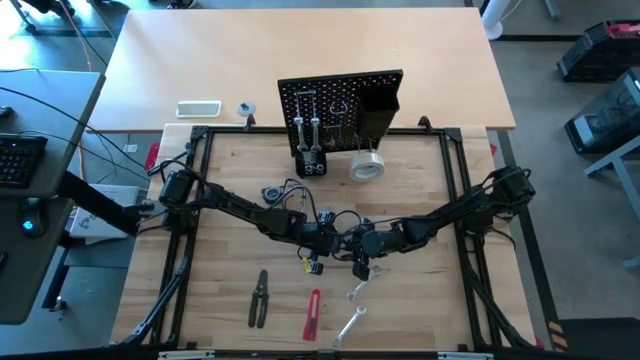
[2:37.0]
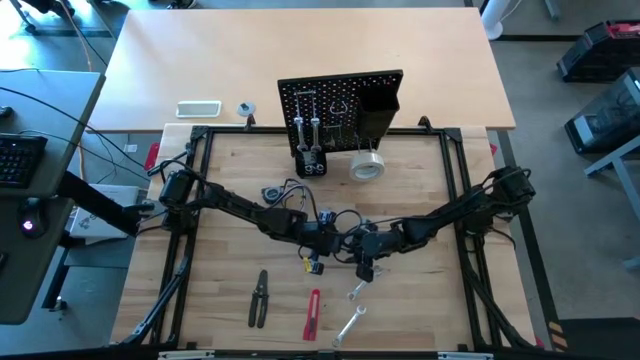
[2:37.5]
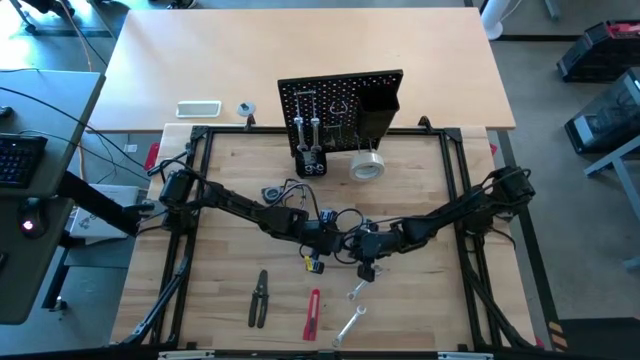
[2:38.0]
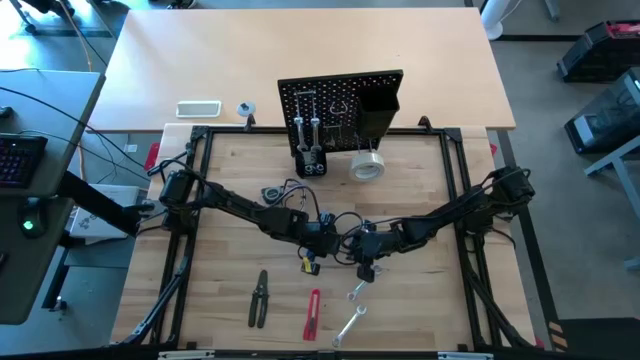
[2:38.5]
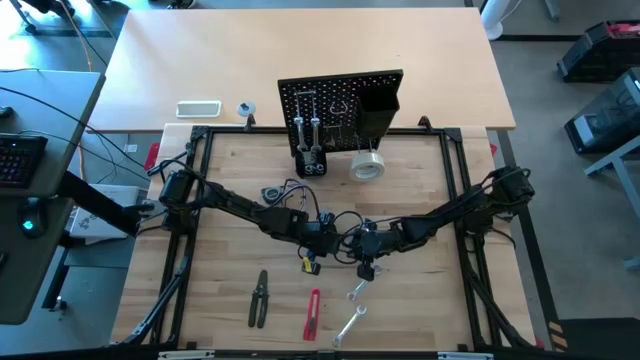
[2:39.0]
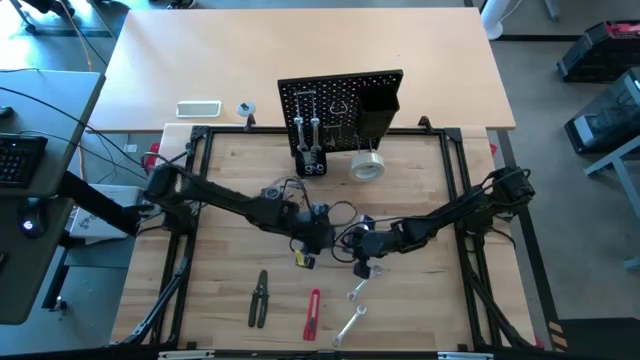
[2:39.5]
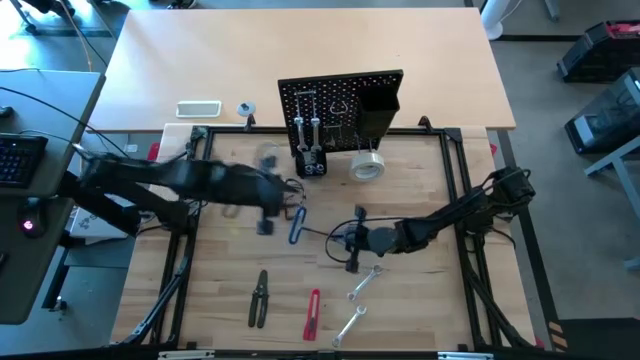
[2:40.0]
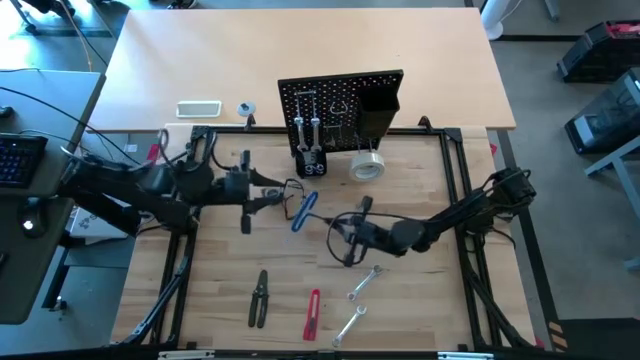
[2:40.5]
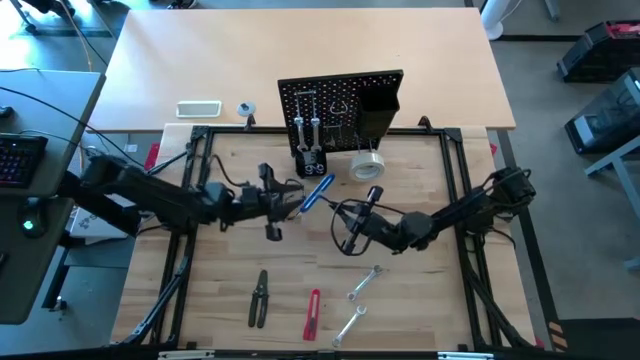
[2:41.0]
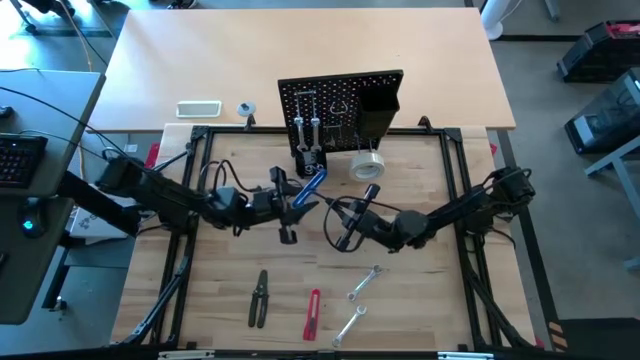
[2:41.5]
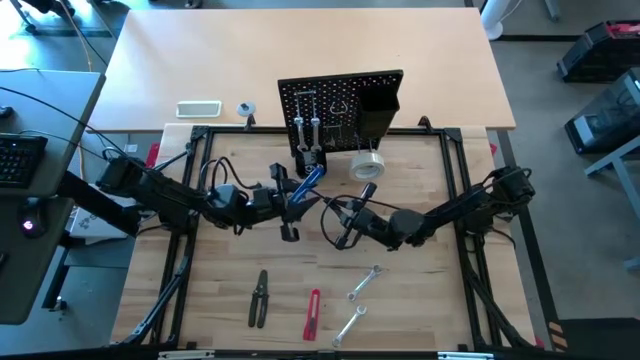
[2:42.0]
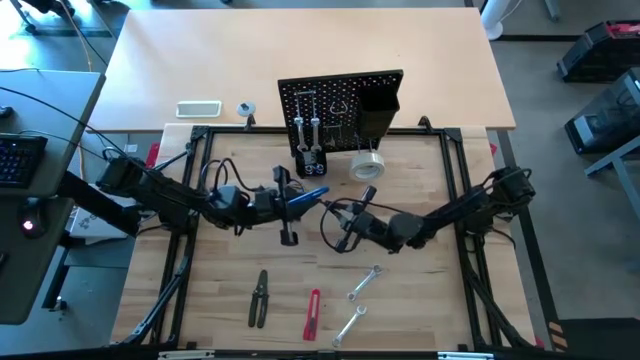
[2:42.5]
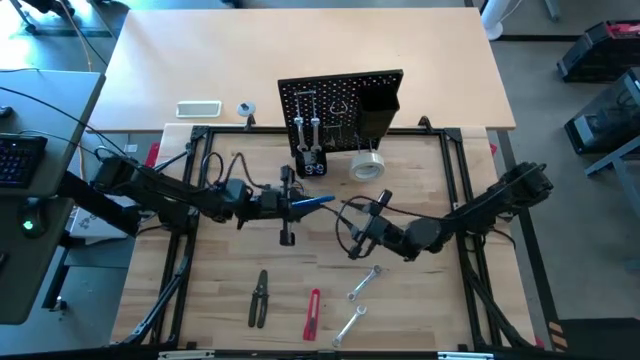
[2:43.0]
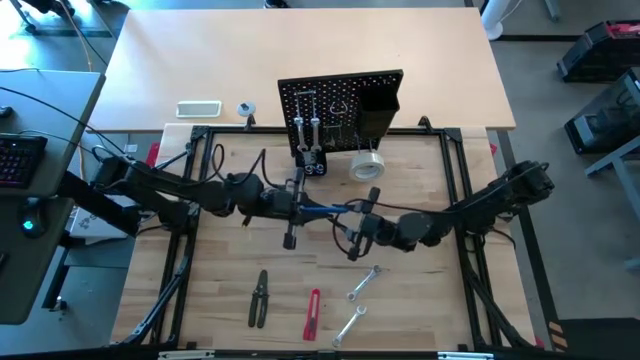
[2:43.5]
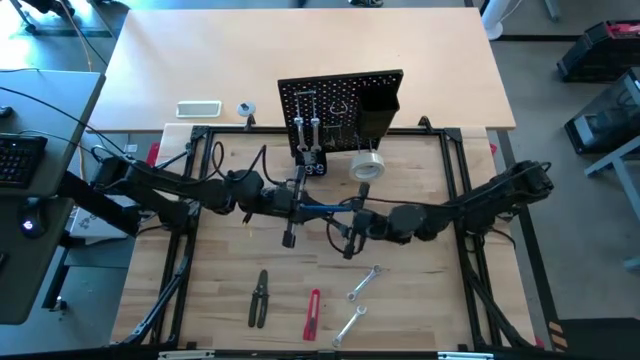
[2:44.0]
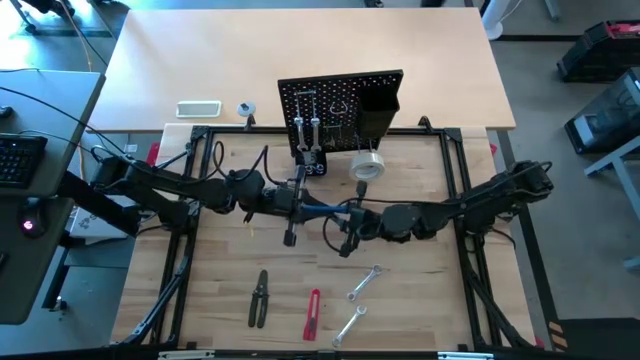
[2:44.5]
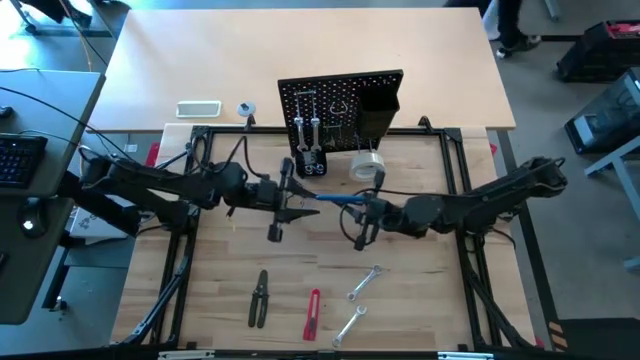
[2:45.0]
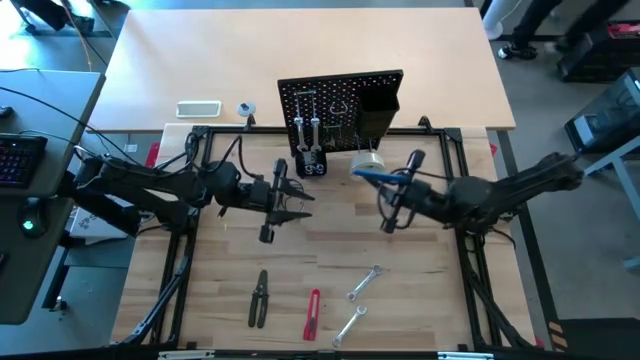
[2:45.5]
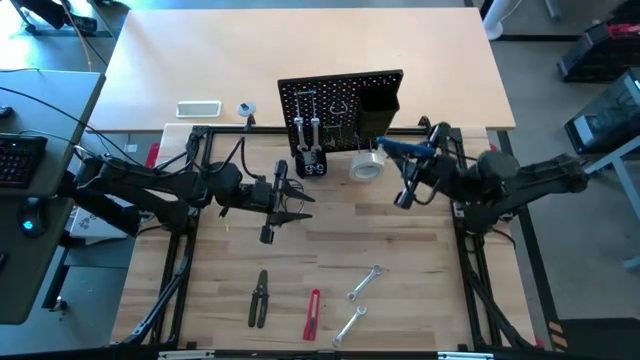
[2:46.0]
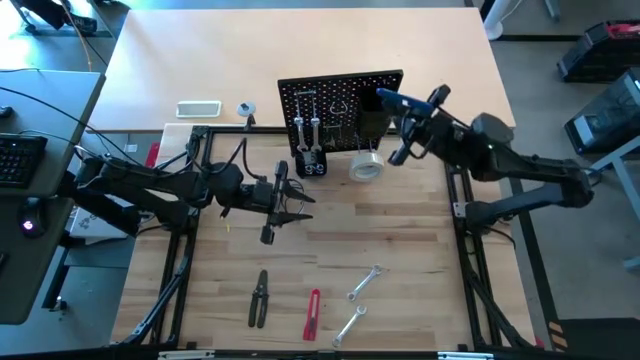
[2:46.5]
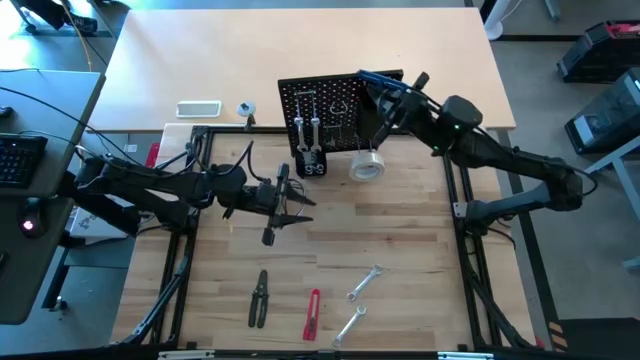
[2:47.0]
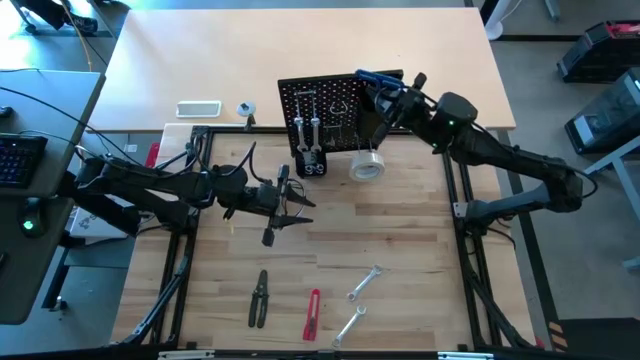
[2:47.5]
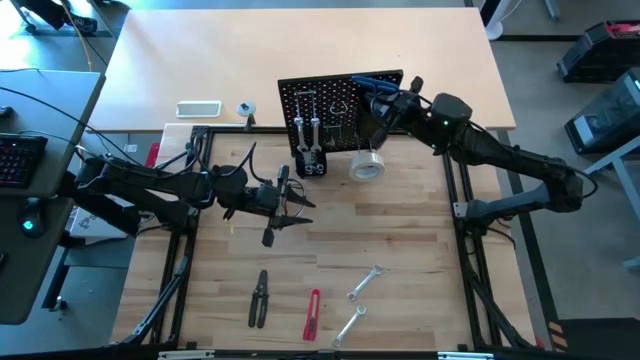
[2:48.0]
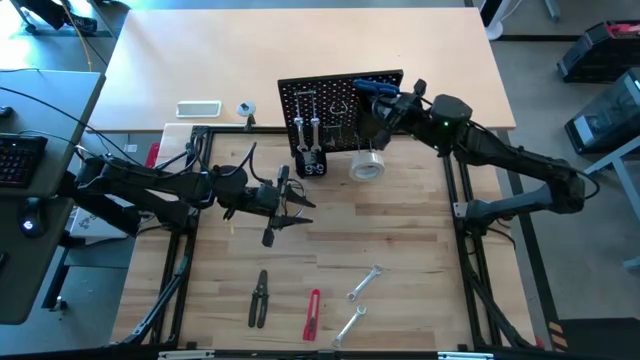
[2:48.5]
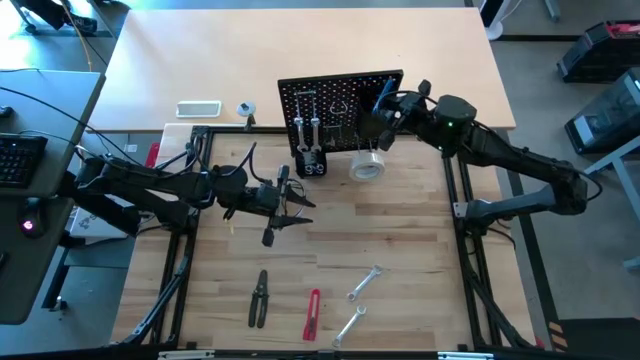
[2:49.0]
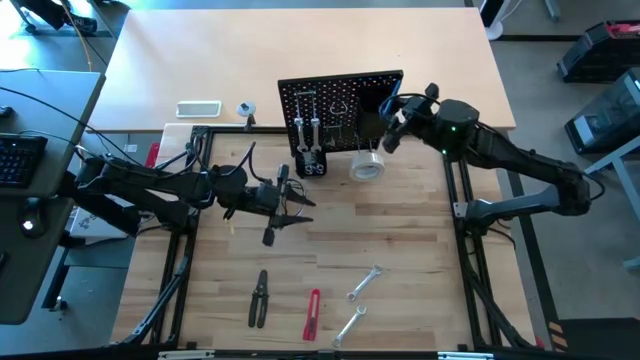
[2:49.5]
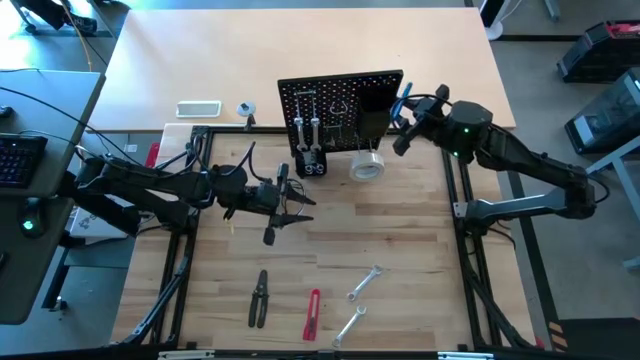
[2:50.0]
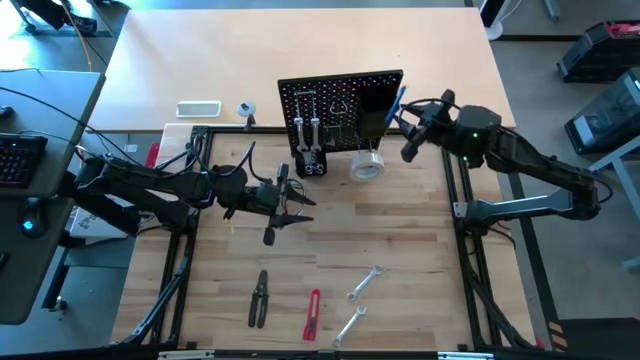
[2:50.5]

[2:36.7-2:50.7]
Task: Hang tools onto peg board
Put the blue pick tool into the top black bin on the peg board

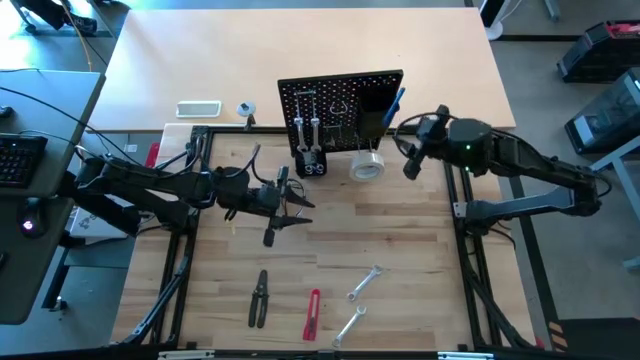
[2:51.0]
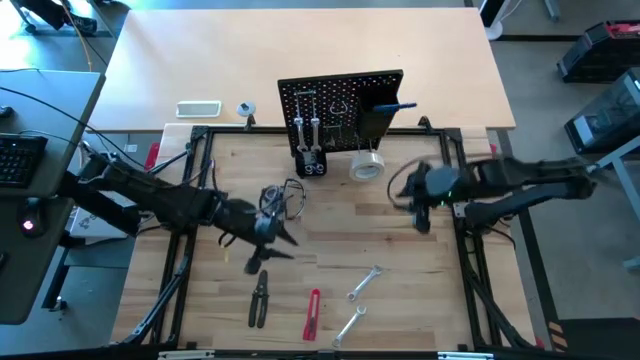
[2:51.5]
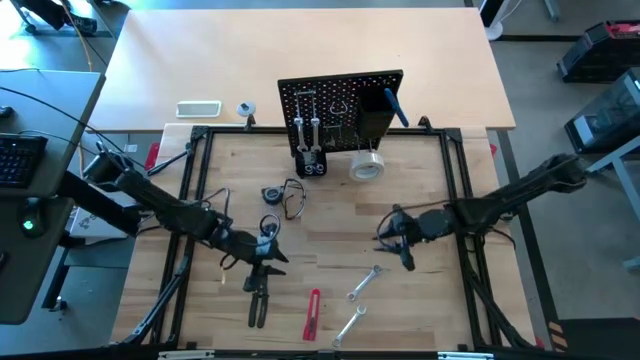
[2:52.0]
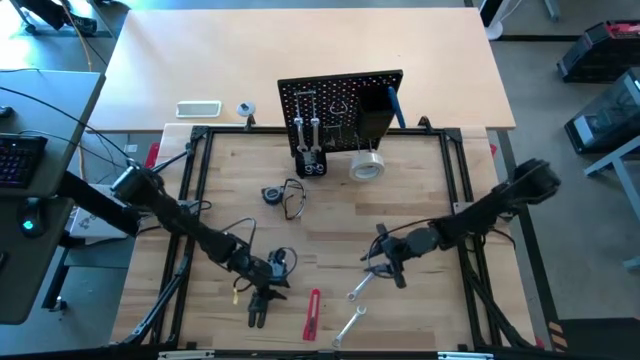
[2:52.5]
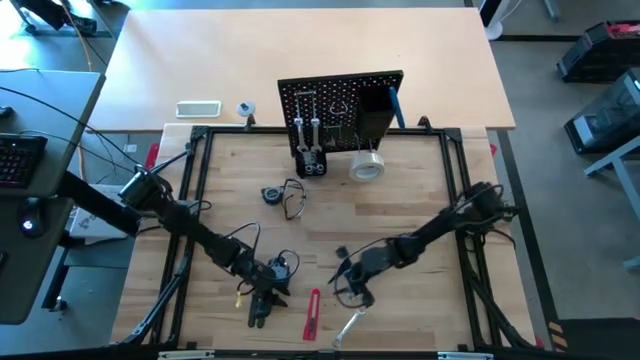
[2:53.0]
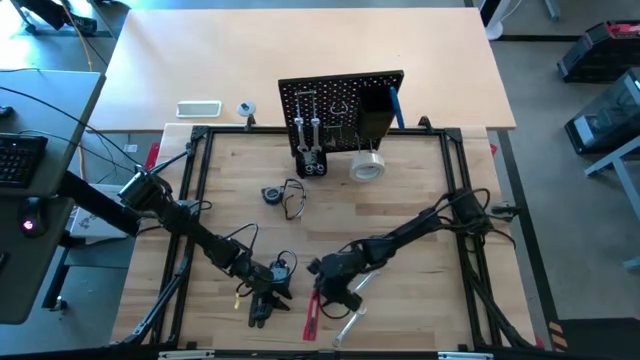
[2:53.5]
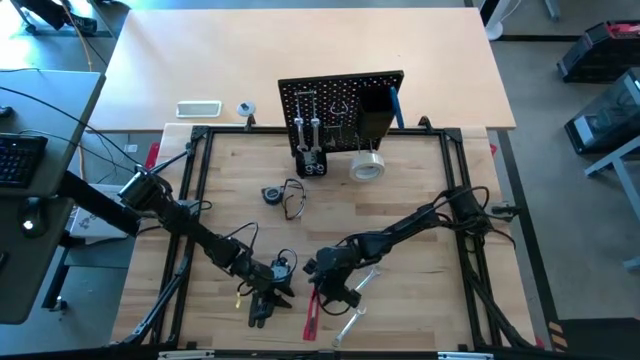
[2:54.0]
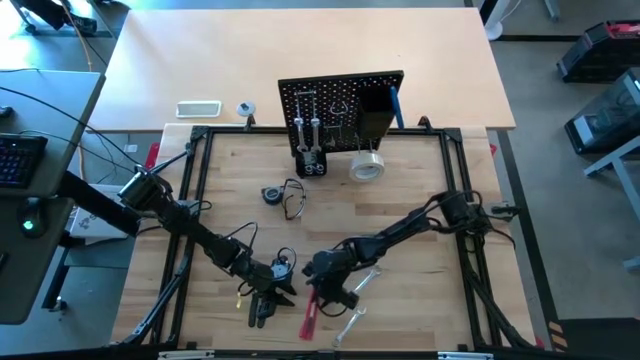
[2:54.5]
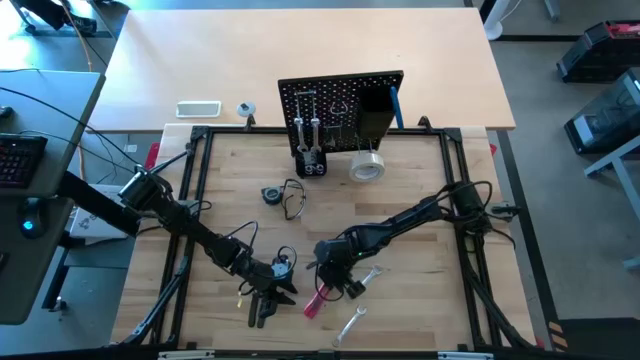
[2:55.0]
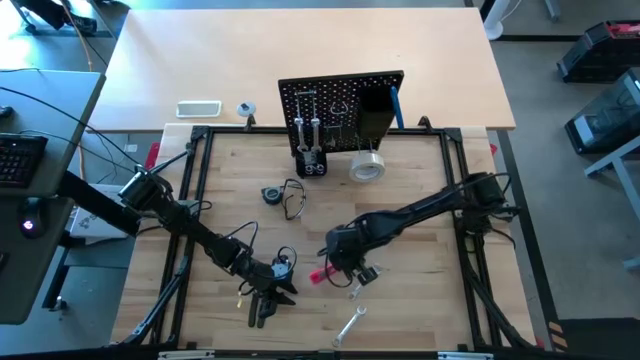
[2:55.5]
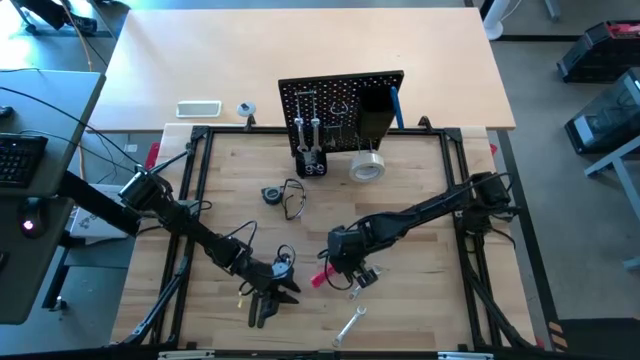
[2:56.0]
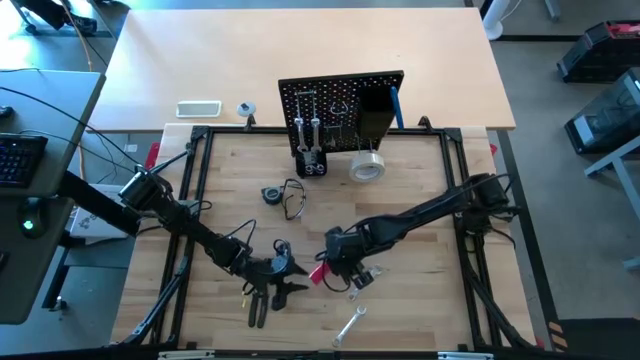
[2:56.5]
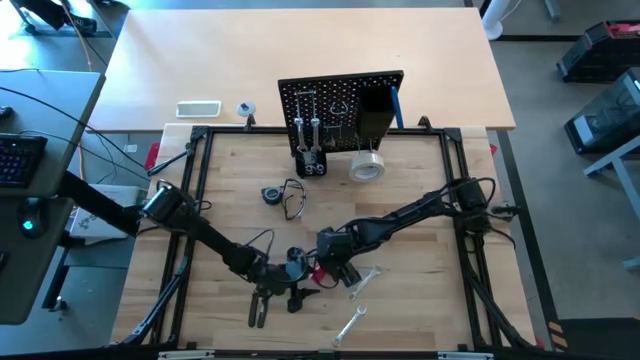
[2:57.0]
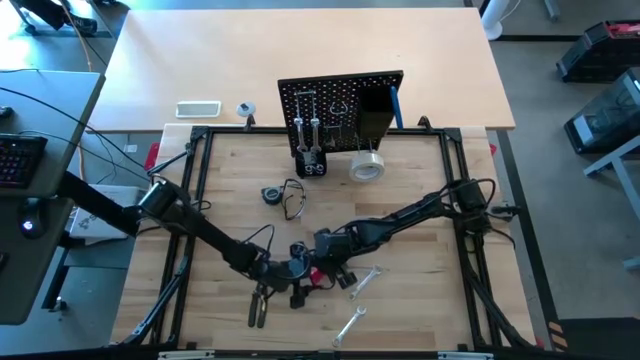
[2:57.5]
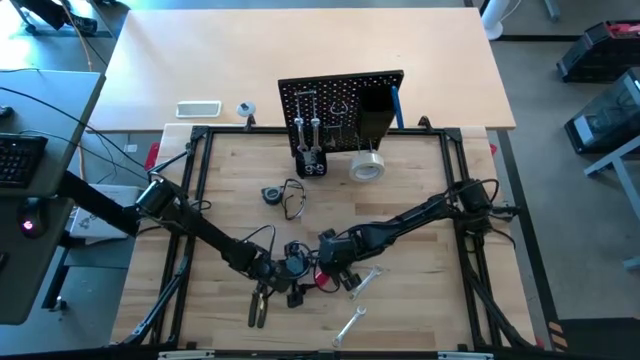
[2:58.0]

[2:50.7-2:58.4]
Put the red cutter into the top black bin on the peg board

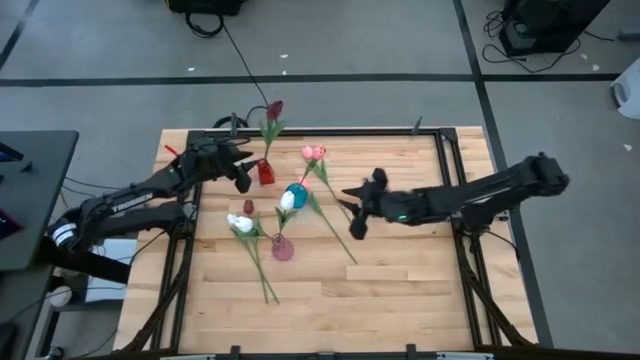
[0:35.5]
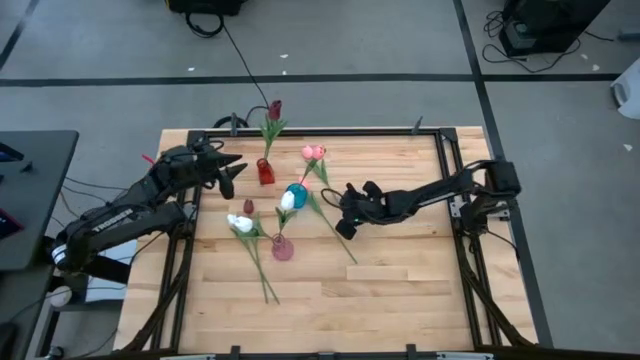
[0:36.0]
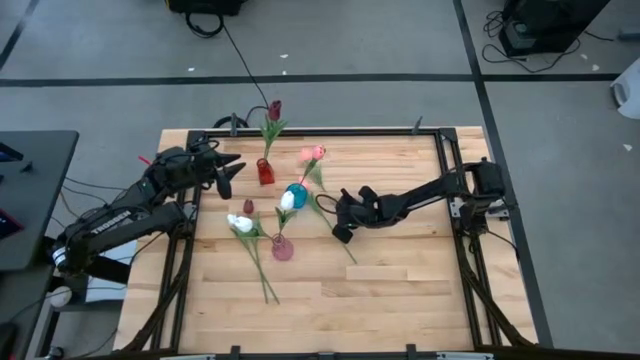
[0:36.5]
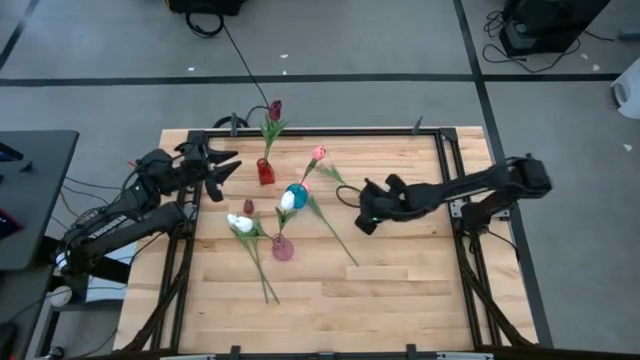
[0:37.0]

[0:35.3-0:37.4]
Task: Sort flowers into vase by color
Put the top pink tulip into the blue vase
